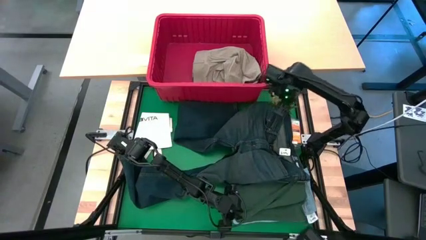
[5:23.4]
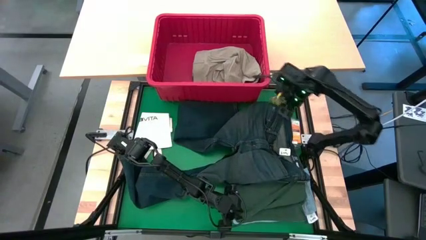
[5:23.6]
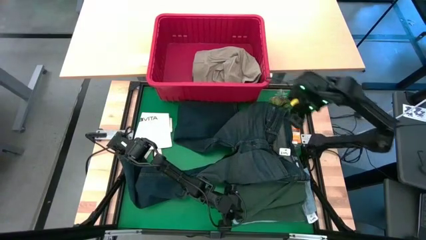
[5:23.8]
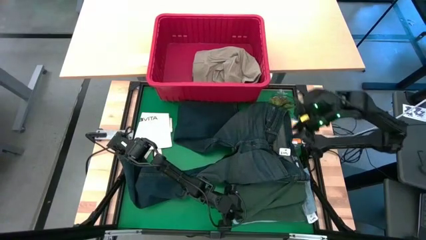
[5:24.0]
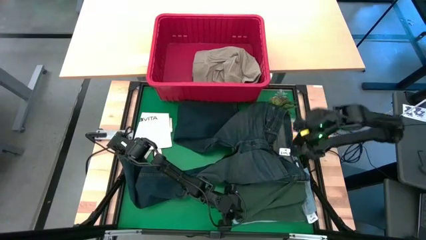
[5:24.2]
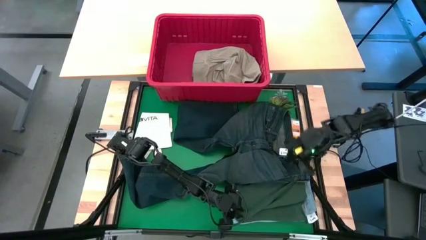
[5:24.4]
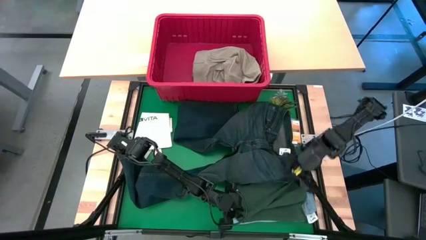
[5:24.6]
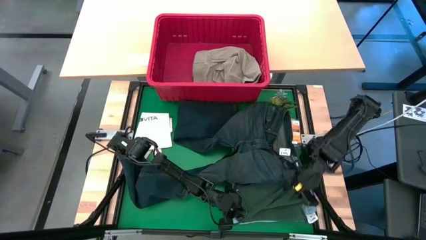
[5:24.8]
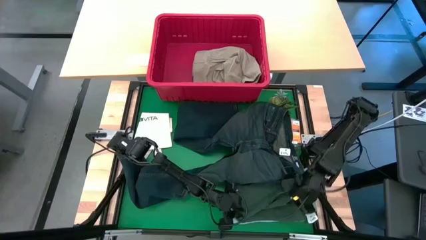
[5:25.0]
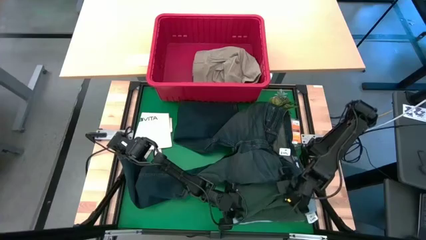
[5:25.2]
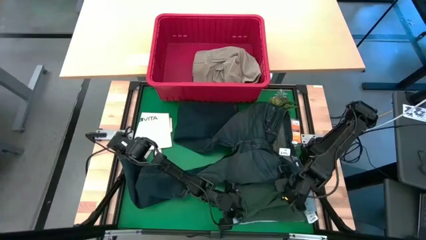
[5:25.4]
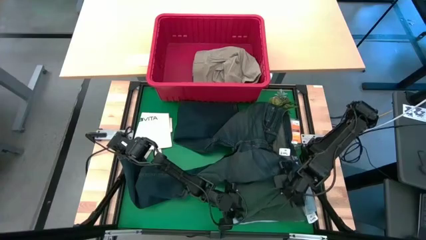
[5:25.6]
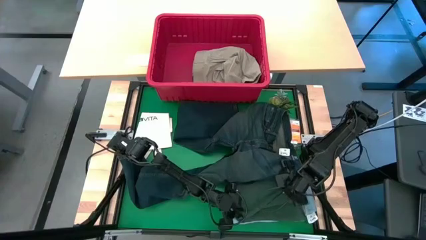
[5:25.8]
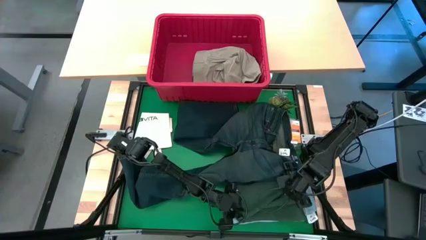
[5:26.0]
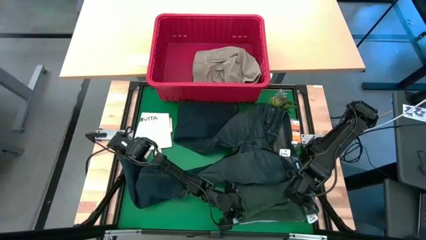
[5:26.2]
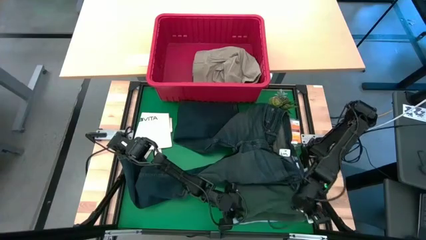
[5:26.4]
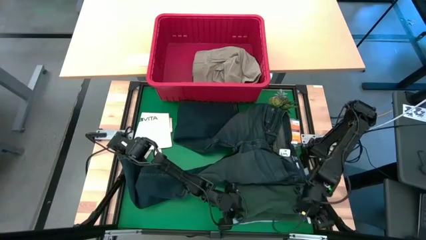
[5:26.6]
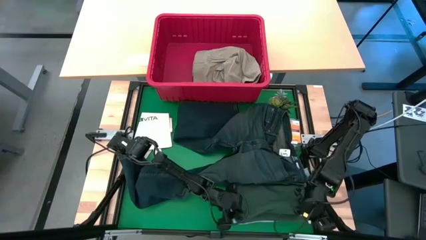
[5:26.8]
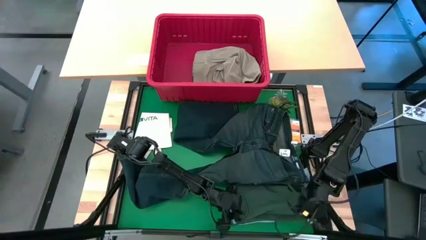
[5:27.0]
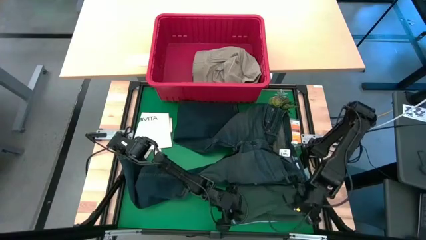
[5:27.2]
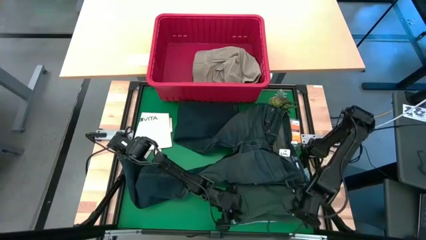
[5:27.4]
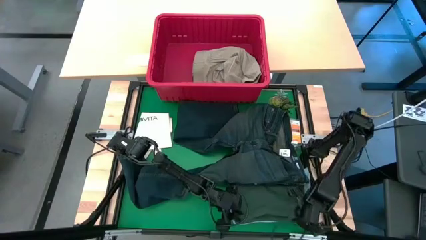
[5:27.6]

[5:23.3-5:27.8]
Task: Fold Laundry from Bin
Adjust the green shirt

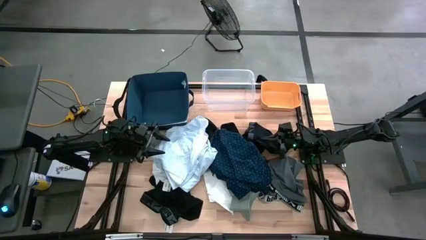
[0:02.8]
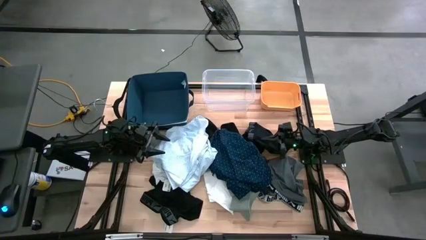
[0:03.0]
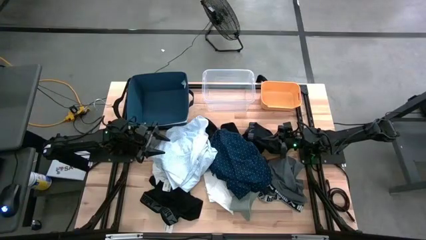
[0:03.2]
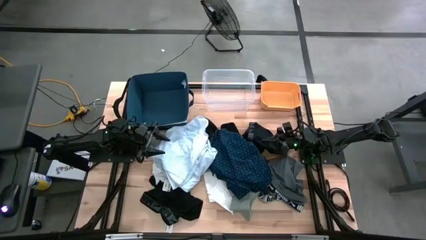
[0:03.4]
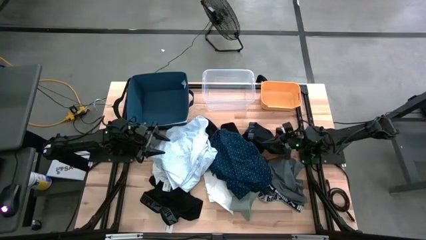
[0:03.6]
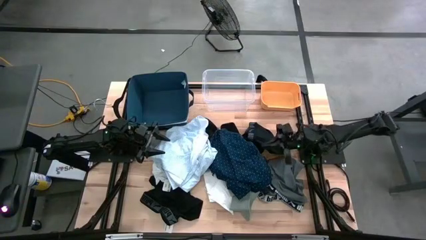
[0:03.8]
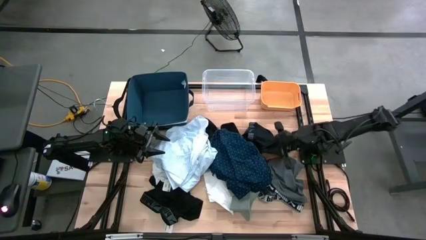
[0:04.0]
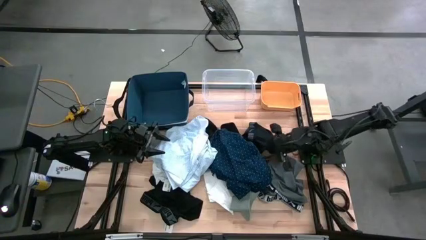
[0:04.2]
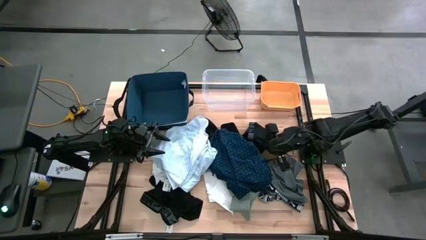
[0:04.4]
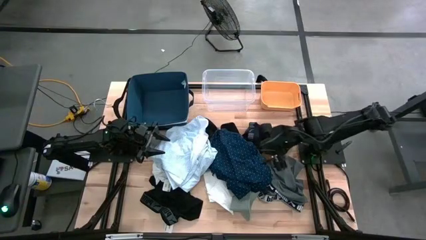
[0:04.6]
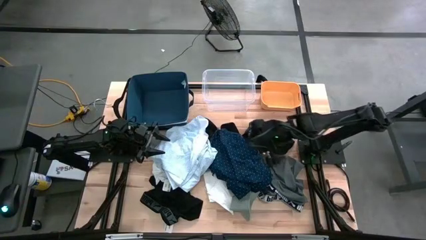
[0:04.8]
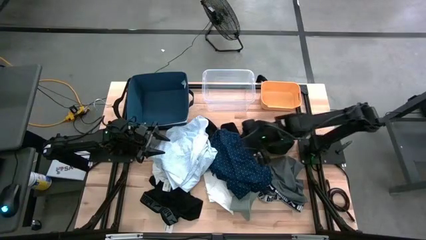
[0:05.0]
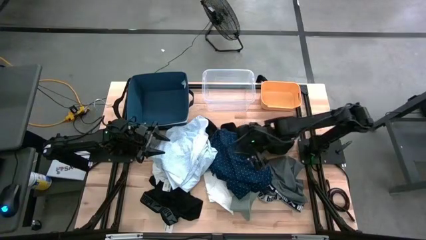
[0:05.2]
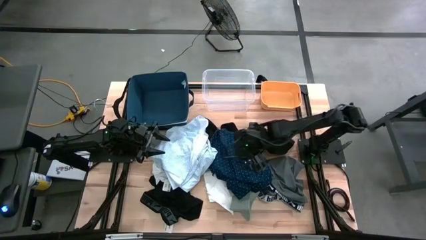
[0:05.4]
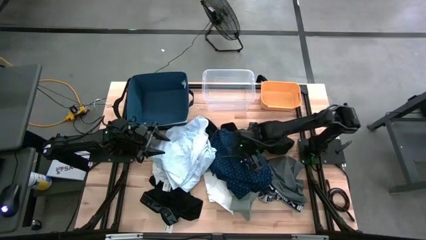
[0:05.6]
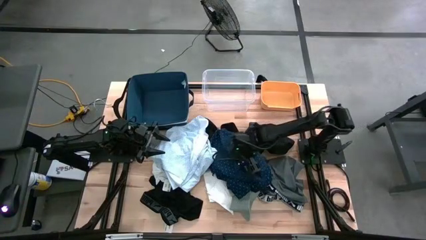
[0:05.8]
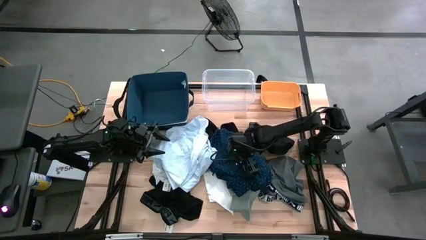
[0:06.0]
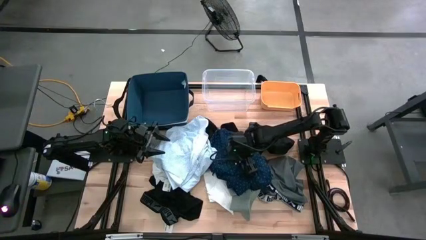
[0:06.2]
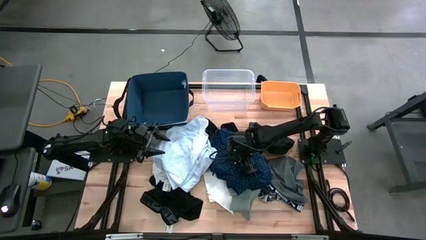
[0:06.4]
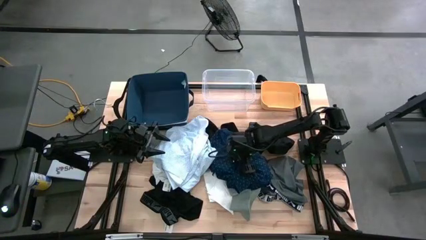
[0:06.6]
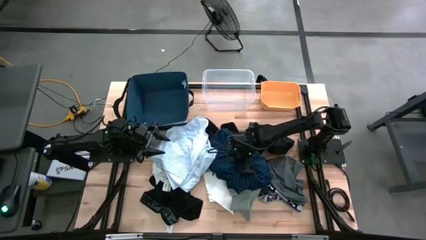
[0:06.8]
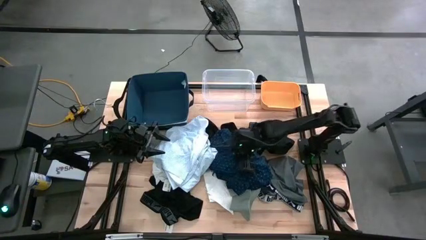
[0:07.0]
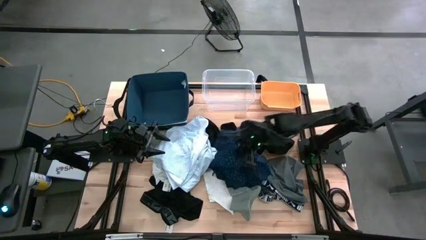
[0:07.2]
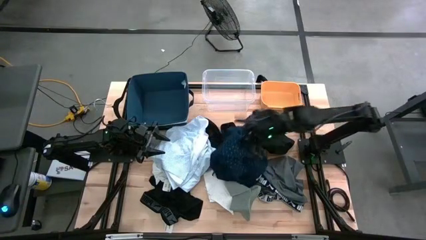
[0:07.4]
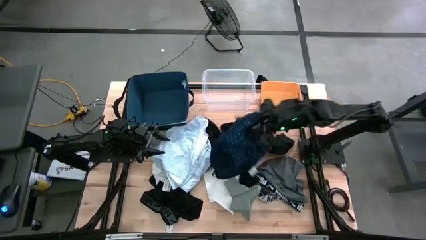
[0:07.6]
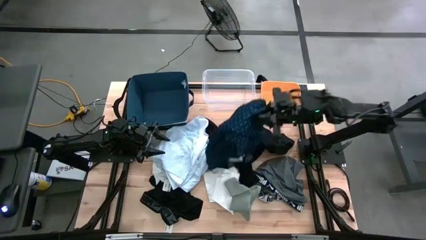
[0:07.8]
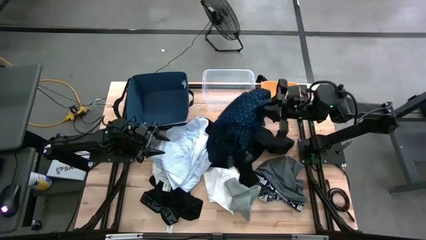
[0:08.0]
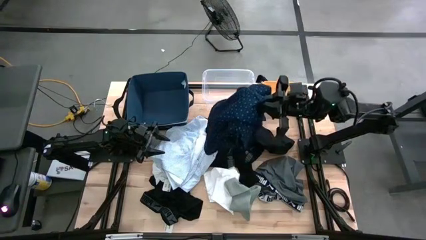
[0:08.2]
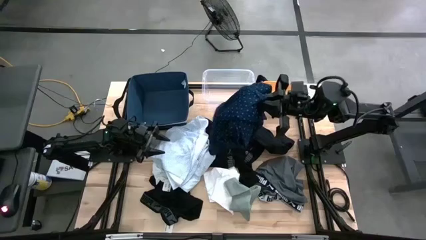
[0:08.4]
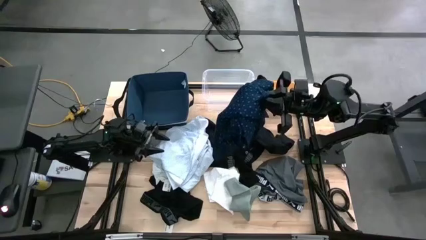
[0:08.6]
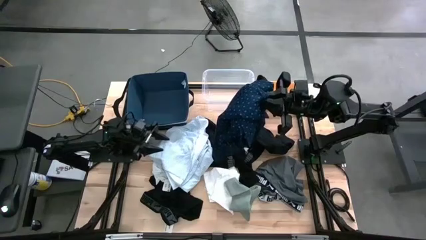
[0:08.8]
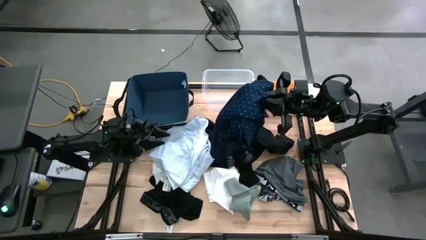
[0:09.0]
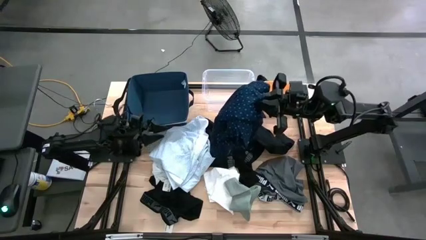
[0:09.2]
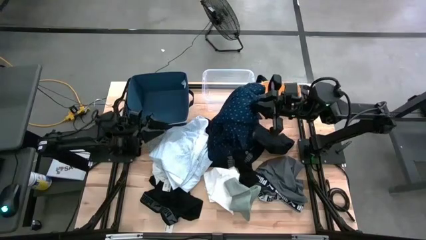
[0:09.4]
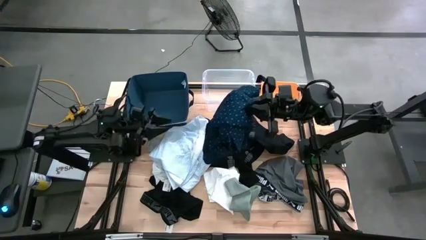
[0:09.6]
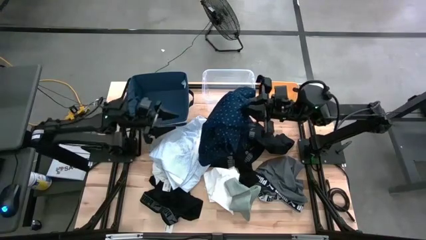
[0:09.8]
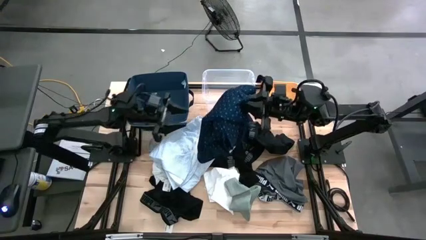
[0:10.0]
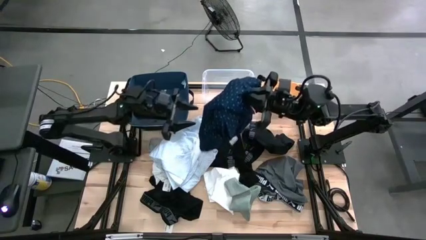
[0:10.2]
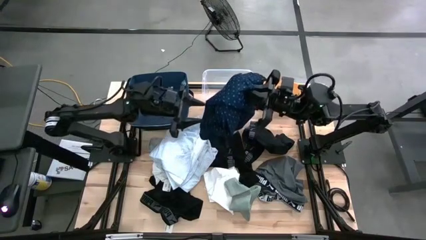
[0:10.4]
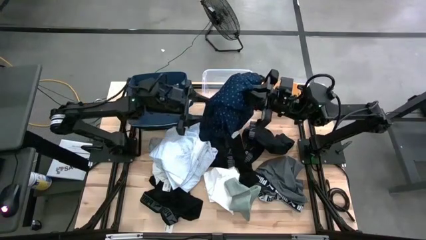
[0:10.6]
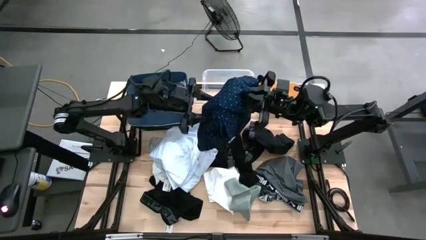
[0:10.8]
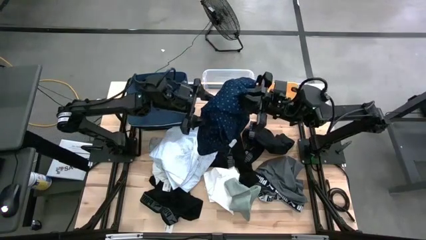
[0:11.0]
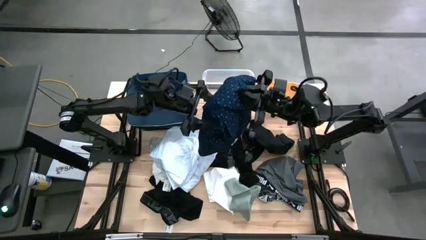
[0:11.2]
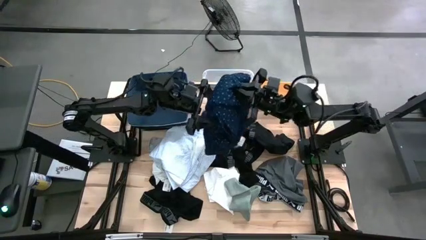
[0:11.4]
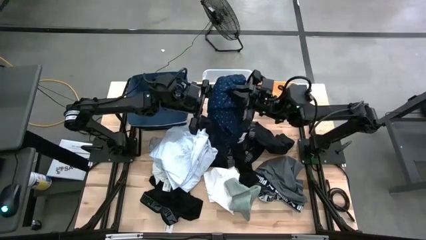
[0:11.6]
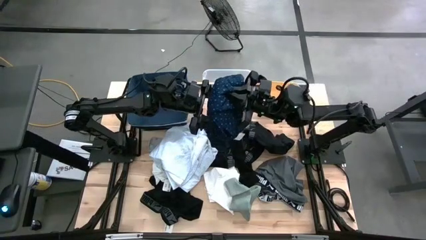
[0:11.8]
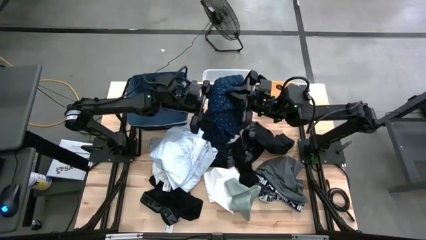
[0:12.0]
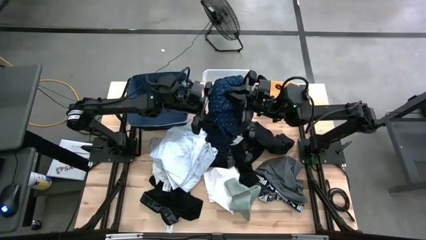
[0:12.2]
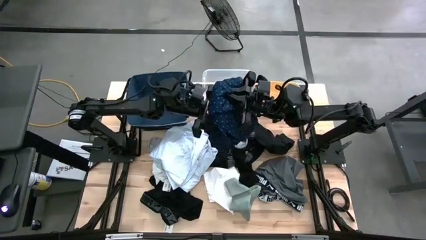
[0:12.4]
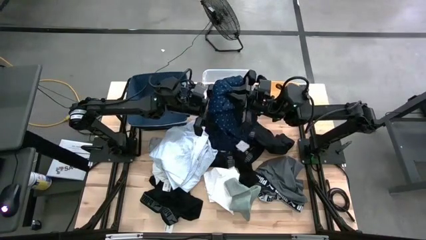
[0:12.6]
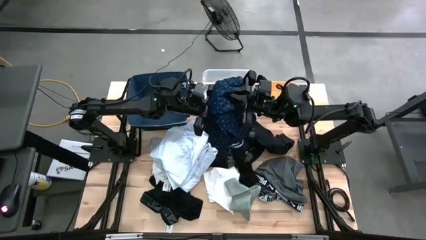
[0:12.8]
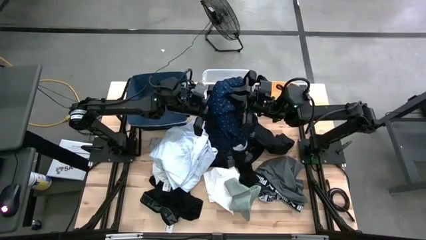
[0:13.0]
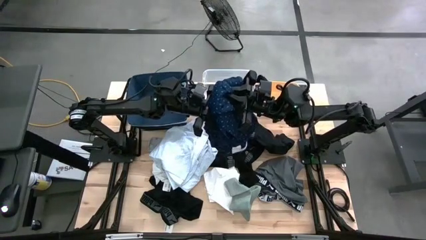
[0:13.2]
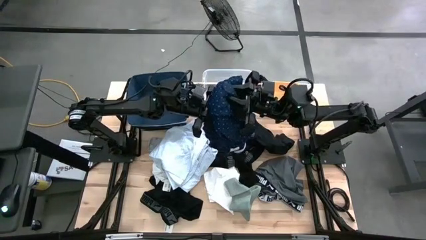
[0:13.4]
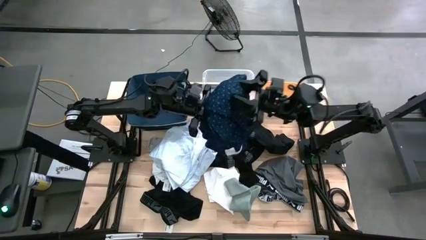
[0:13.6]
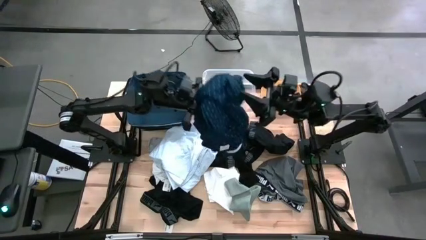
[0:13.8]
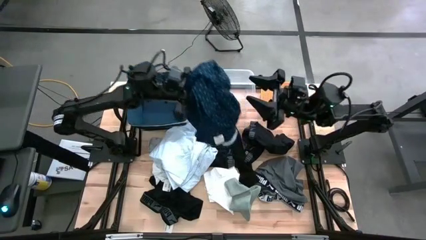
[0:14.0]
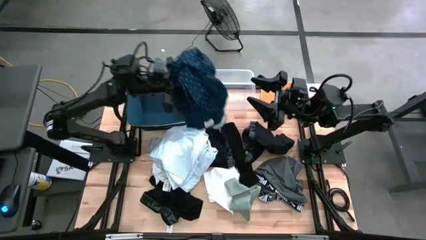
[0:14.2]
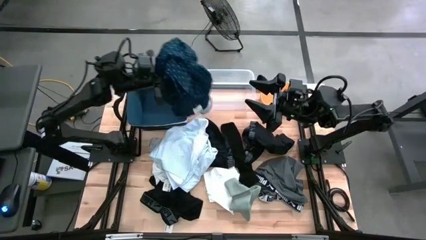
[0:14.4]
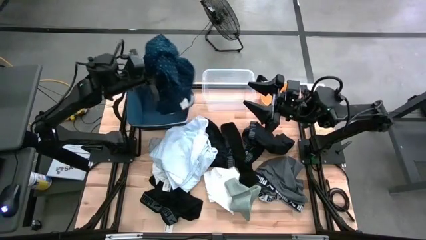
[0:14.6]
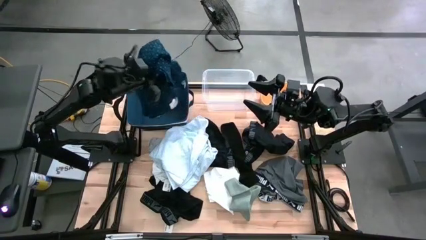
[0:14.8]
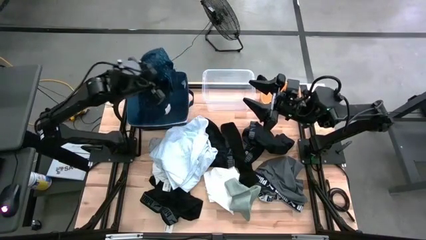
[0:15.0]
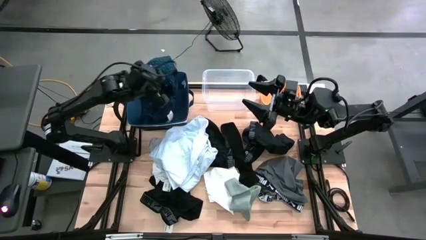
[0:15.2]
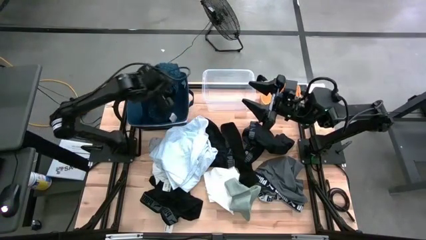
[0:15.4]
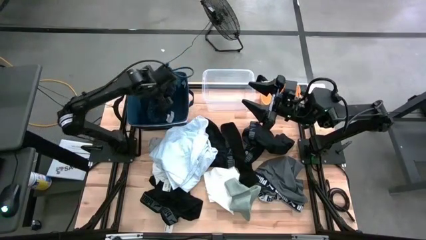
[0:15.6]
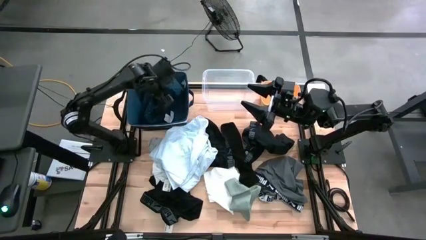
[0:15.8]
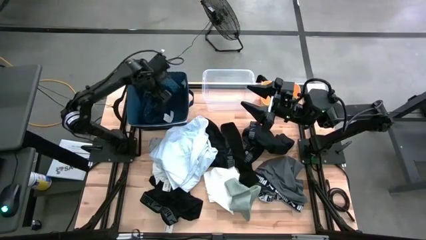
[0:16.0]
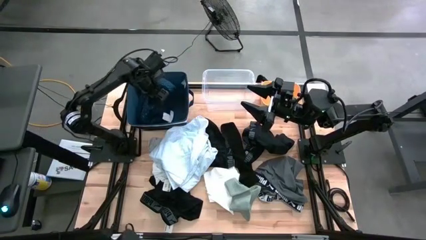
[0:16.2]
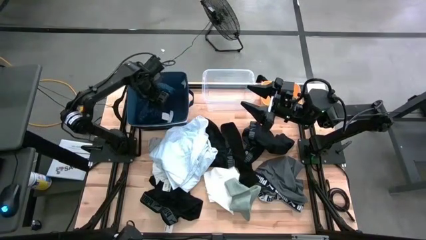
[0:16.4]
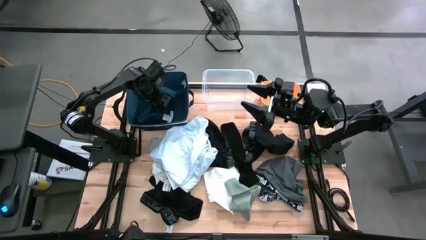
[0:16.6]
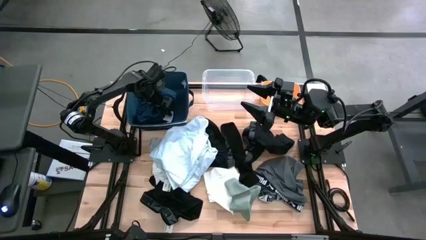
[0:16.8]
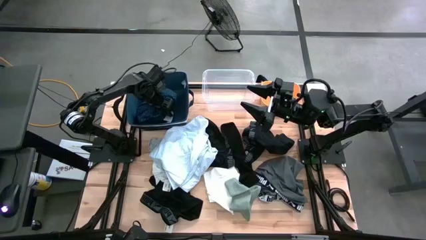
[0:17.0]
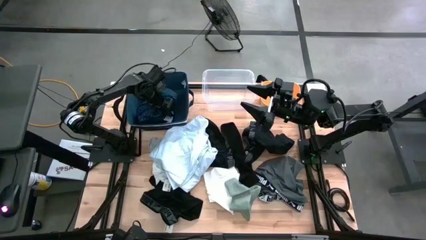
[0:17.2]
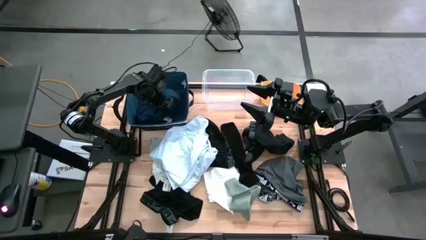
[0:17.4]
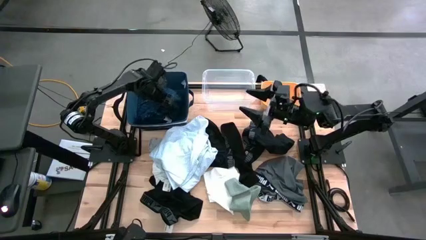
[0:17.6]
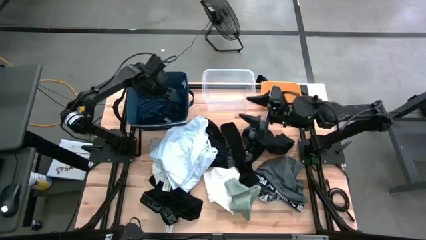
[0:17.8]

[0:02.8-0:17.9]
Task: Pick & Place Cloths
Put the blue plaid shirt into the blue bin
